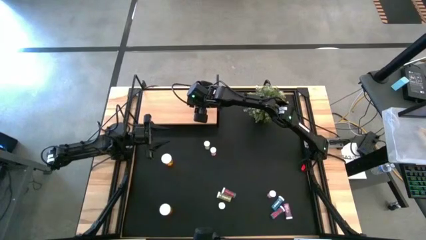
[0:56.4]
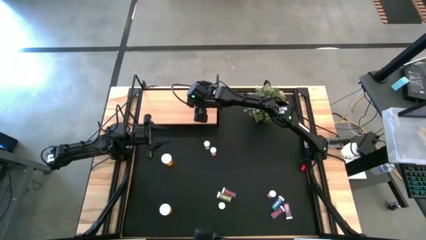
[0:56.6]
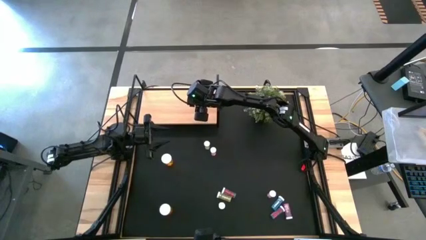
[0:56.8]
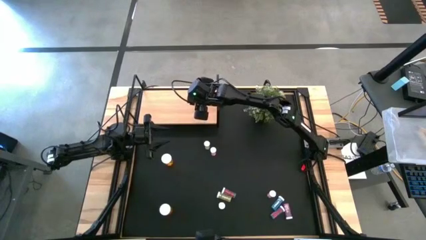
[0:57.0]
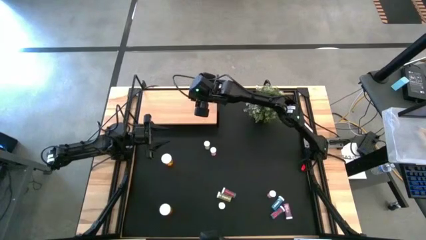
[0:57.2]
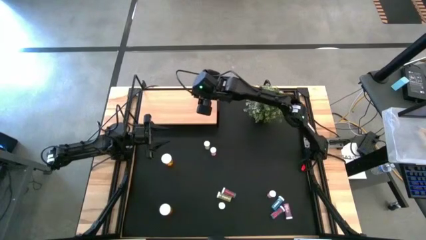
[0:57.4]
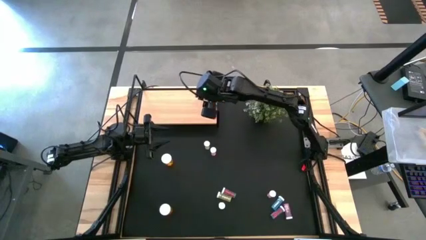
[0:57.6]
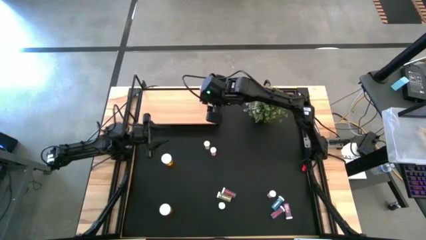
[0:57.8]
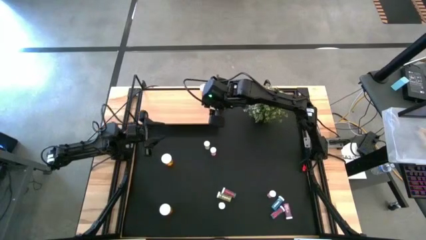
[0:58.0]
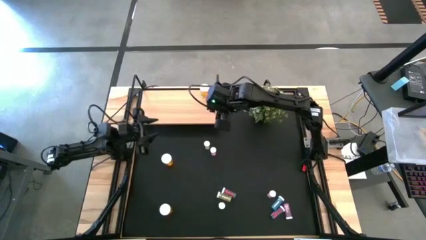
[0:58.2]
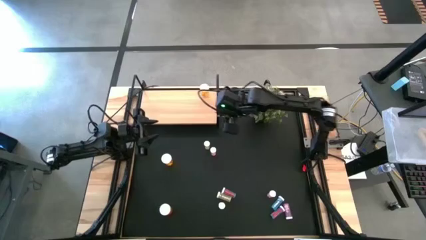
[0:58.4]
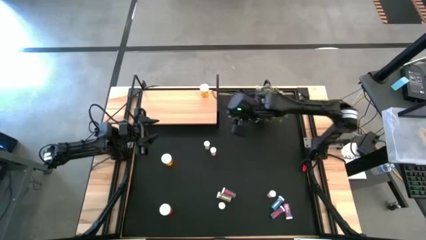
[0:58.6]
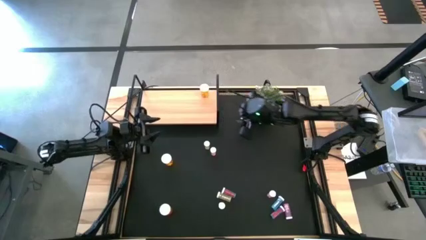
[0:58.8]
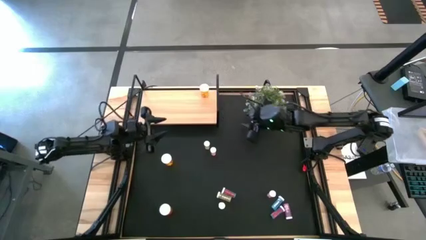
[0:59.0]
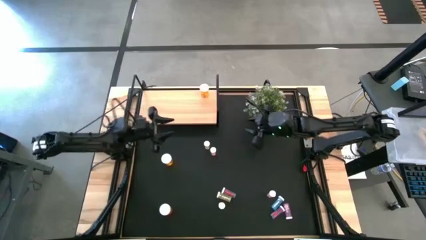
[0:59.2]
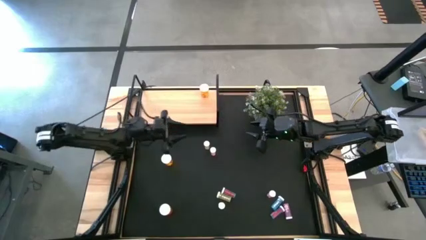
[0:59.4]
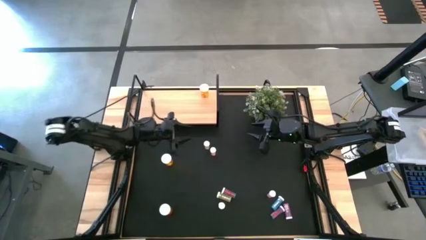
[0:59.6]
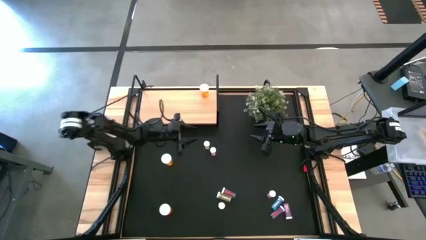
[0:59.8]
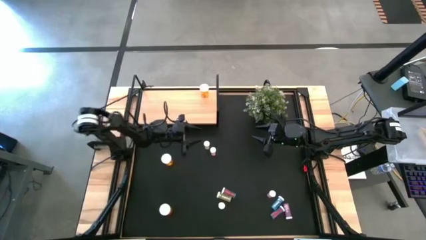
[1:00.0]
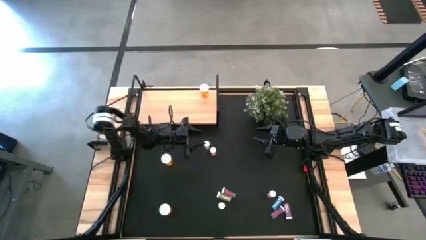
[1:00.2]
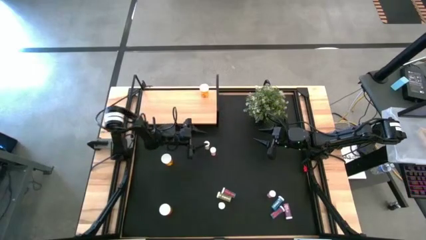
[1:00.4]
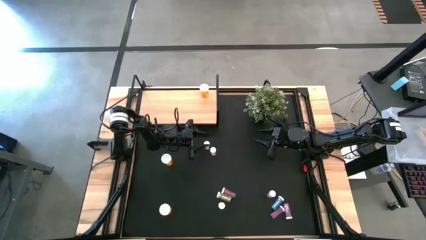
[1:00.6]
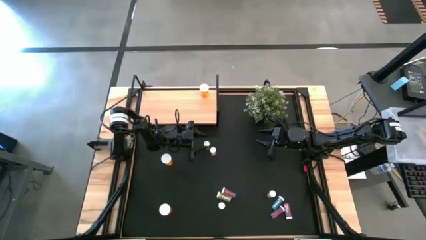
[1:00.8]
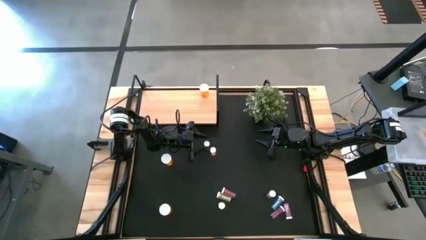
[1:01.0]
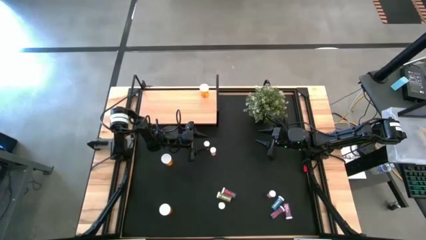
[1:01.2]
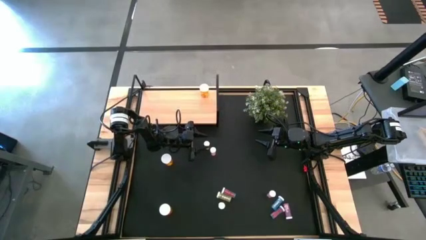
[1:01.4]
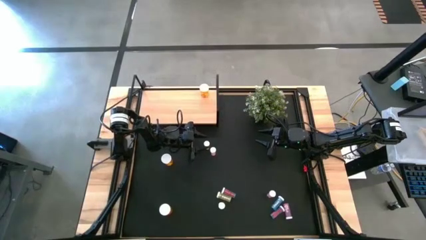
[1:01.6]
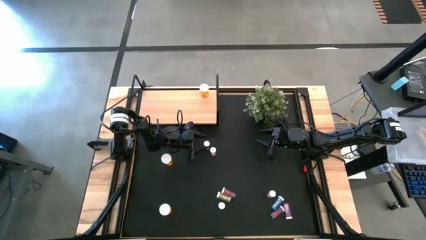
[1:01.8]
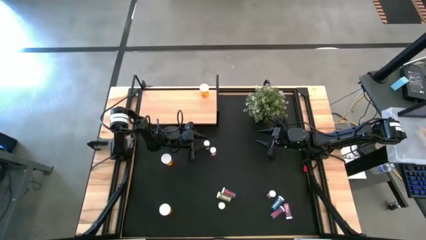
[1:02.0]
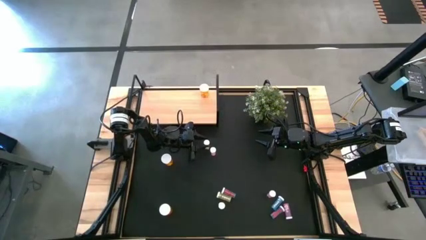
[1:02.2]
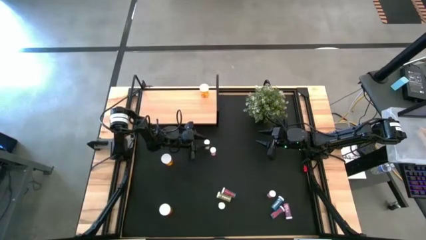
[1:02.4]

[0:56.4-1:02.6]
Task: Pick and place medicine bottles onto shelf by color
Put the top yellow medicine bottle on the shelf

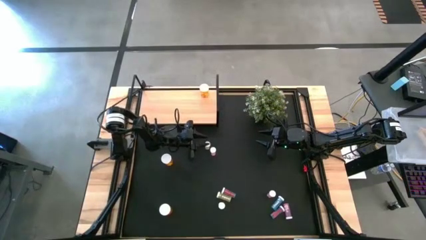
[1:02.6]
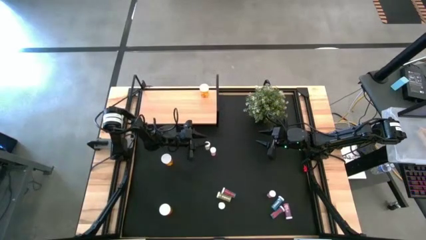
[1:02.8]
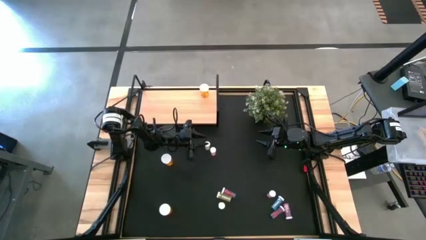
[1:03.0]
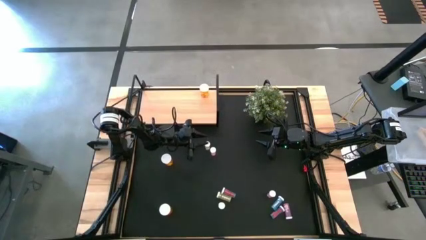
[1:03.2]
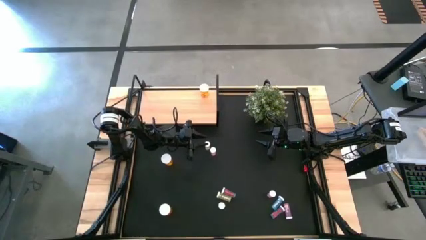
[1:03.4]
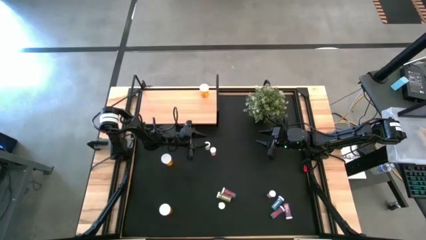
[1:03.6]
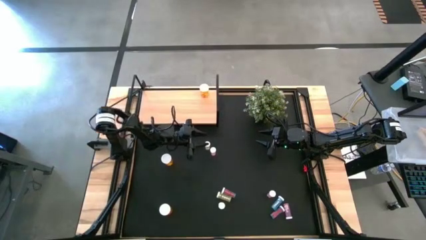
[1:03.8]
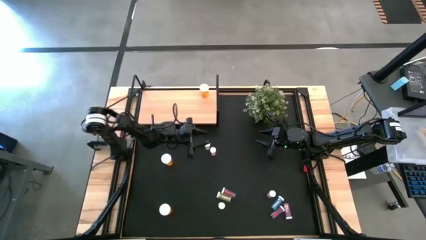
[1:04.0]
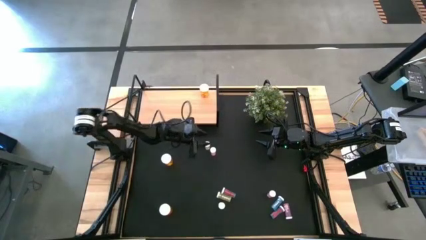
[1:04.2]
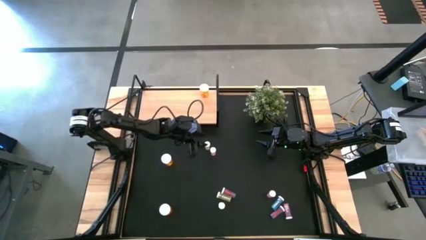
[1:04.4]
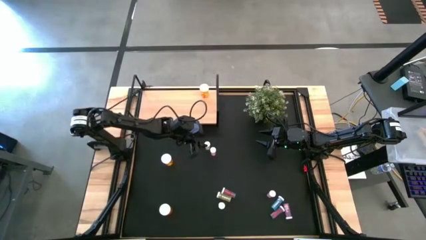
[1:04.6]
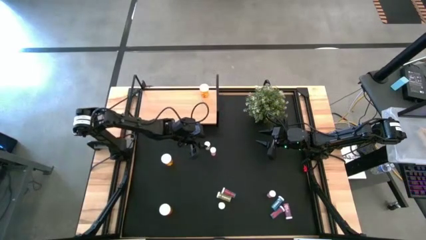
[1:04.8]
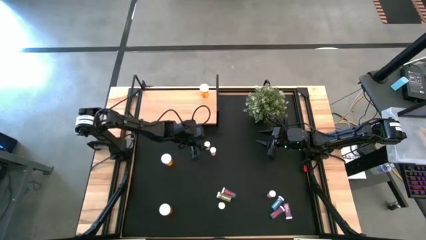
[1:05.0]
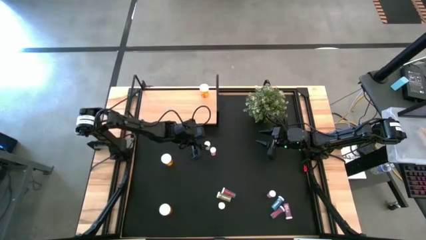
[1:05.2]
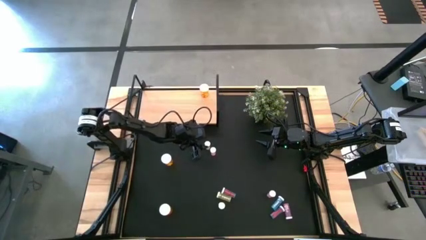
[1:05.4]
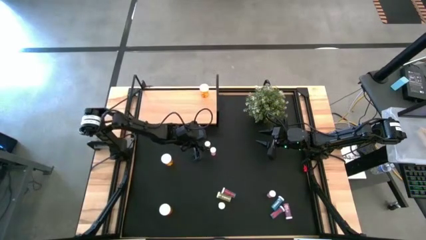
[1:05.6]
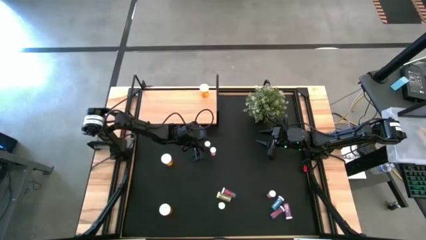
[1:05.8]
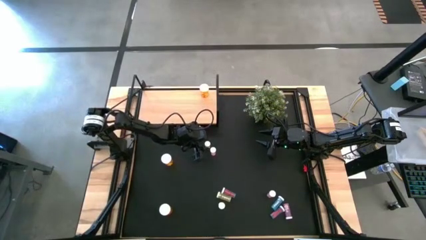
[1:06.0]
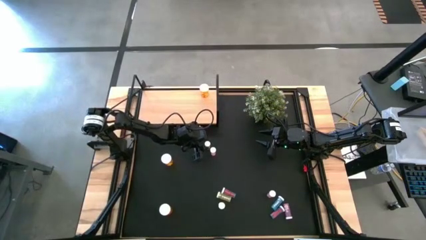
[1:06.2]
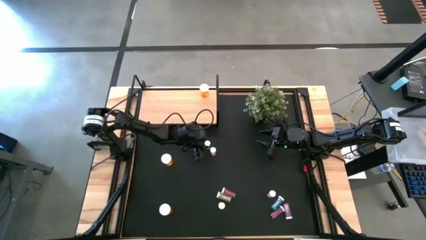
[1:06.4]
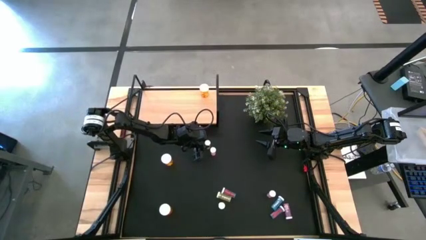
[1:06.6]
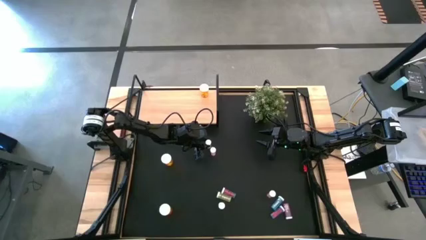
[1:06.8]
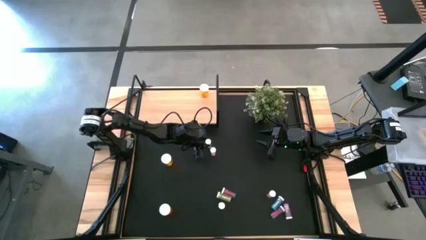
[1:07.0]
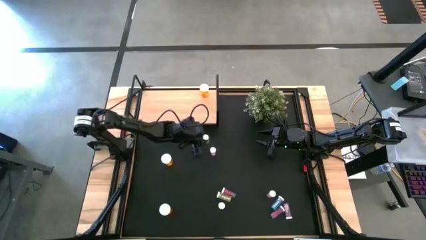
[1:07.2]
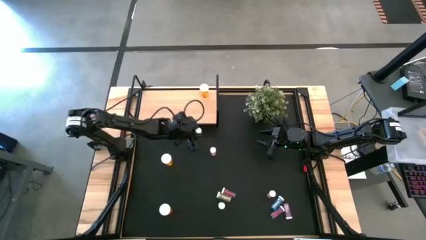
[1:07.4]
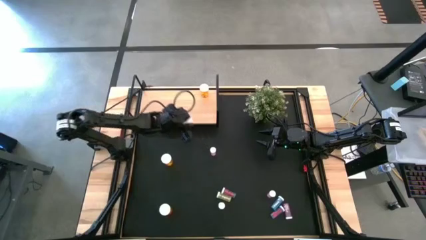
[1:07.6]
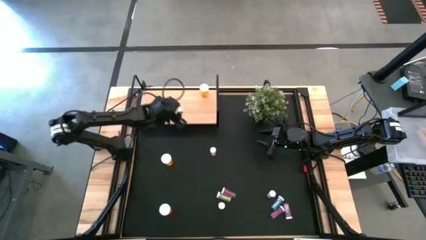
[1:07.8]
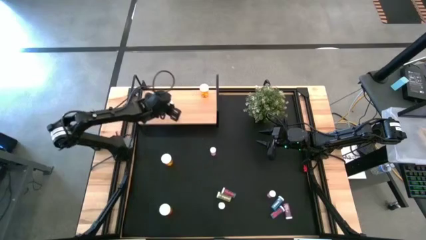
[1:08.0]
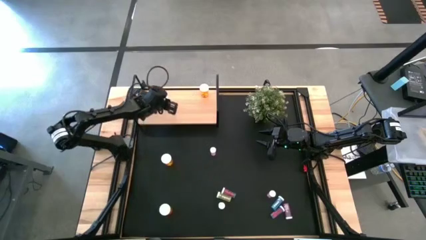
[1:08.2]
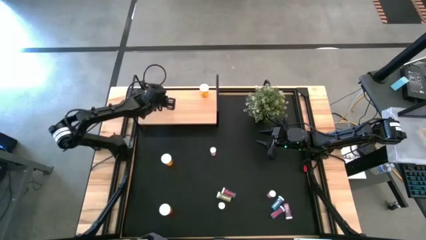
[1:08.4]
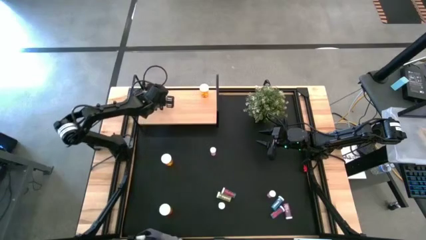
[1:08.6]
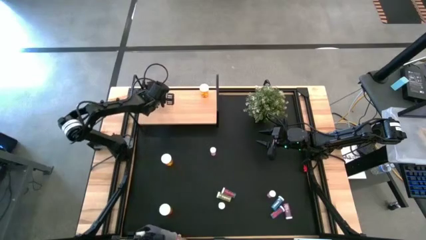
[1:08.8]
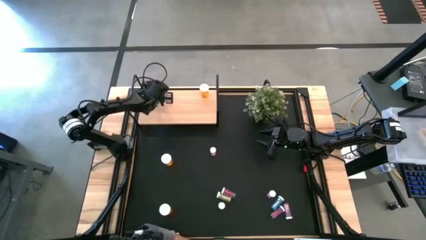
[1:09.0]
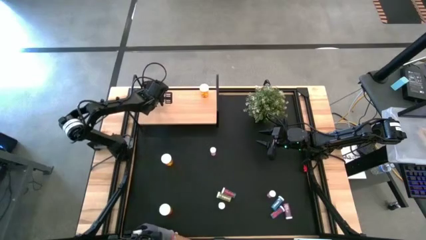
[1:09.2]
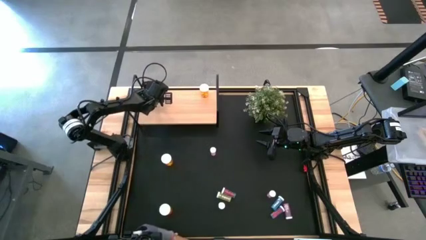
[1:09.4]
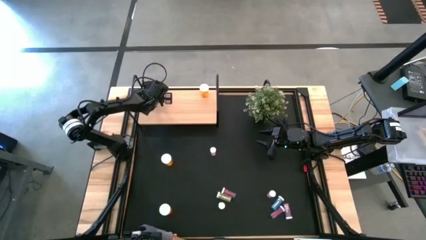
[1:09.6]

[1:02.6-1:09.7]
Put the top yellow medicine bottle on the shelf

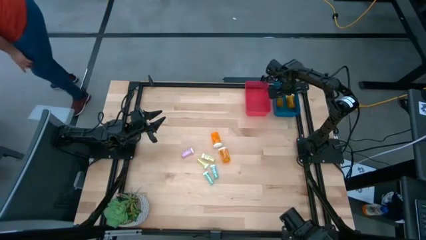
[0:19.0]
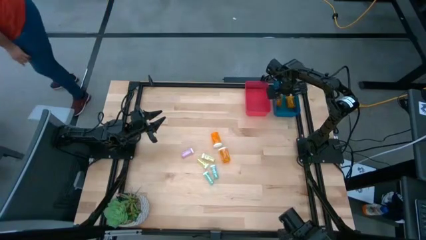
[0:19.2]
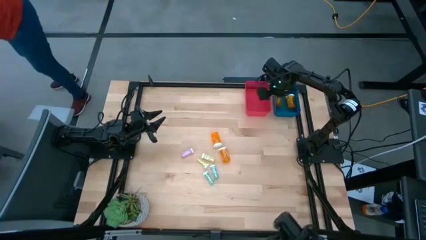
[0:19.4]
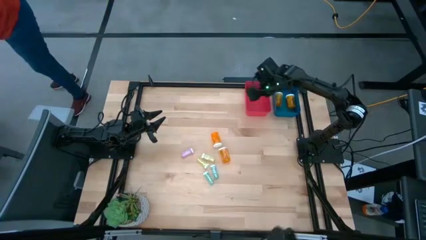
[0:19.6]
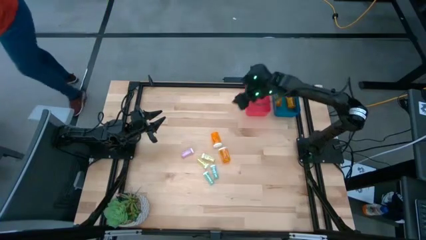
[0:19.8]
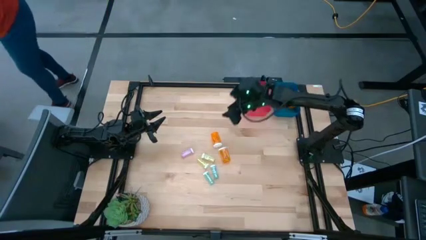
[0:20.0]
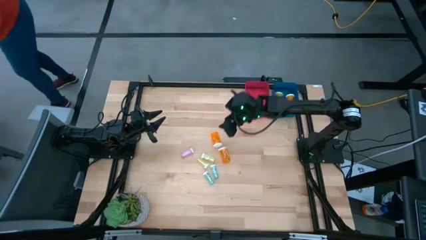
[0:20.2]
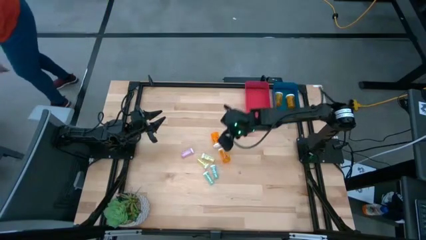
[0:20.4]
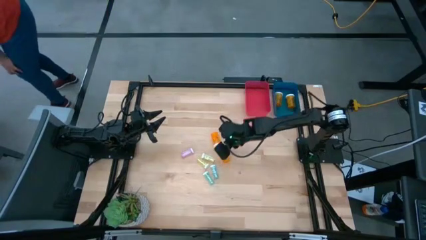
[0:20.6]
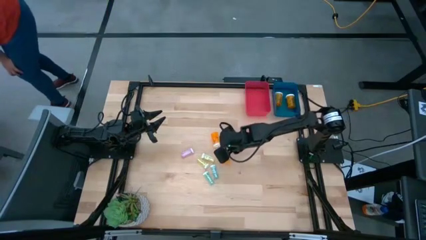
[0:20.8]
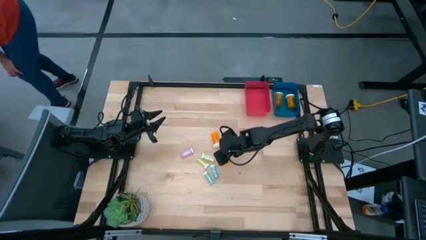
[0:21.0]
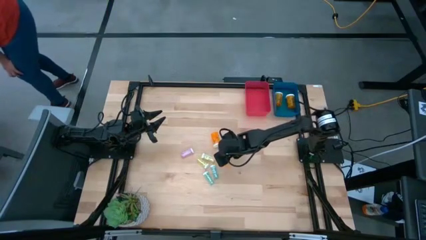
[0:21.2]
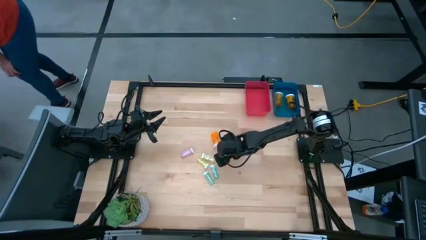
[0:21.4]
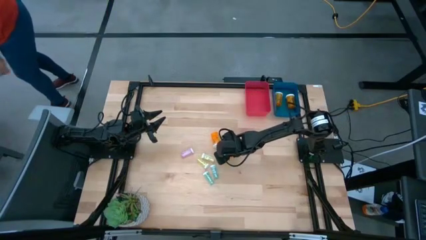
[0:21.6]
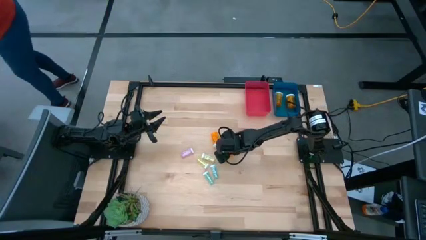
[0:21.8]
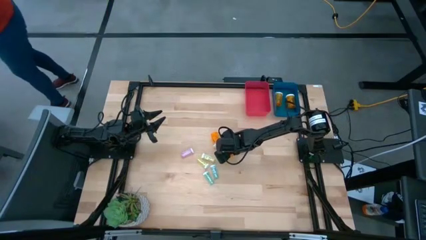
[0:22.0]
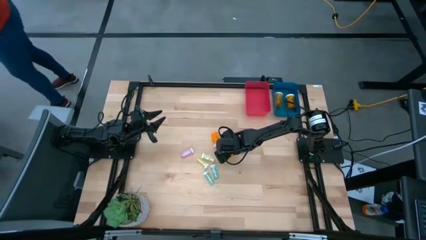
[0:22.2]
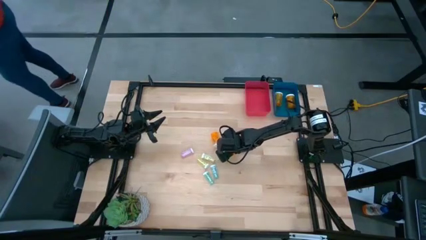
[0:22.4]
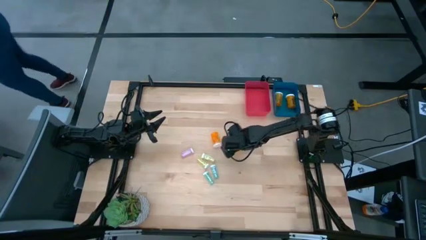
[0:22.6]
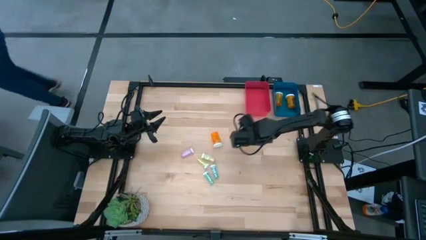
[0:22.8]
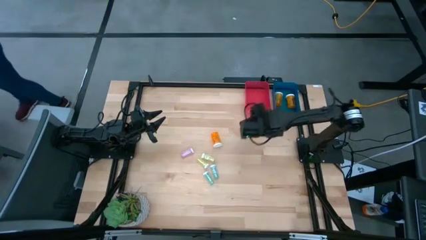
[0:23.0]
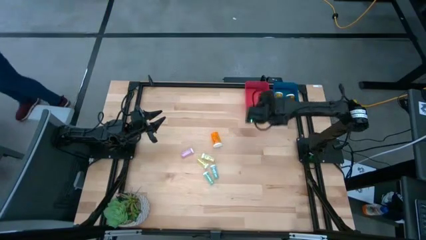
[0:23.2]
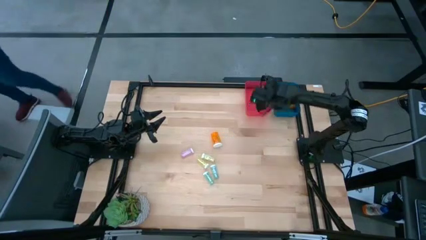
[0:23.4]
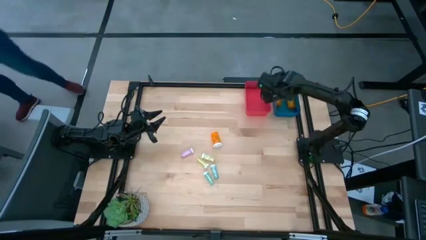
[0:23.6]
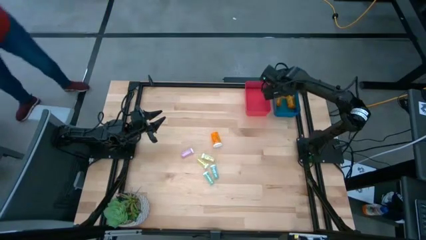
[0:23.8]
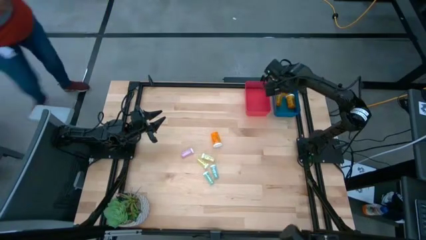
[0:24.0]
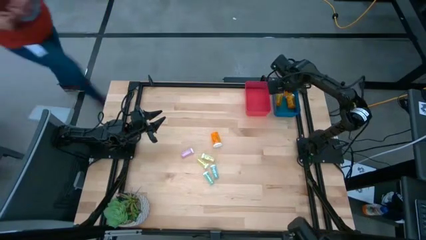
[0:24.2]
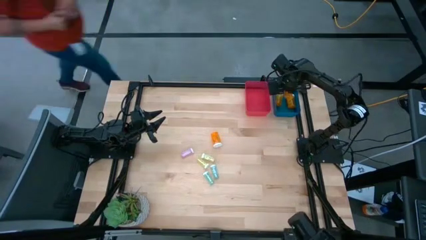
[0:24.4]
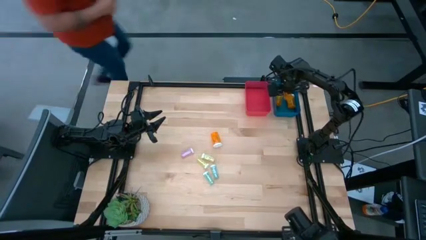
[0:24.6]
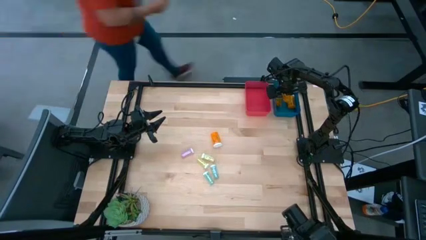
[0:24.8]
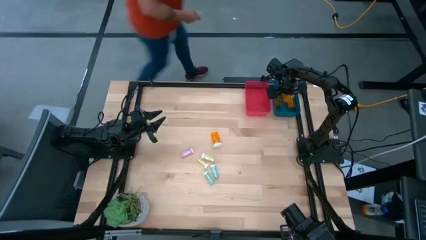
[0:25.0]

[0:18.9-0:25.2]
Task: Pick and place medicine bottles into bin by pill shape (circle, oval)
Put the orange capsule bottle into the blue bin
